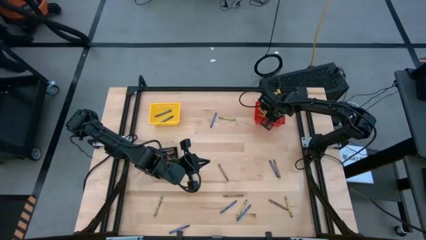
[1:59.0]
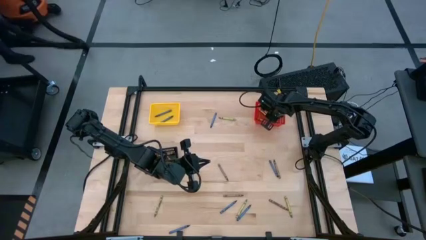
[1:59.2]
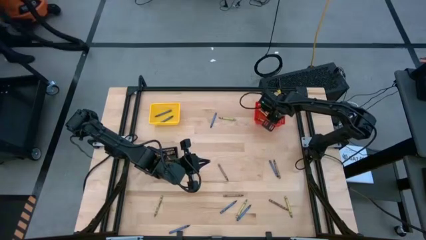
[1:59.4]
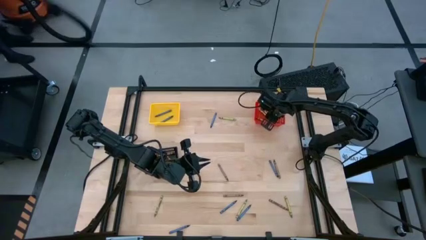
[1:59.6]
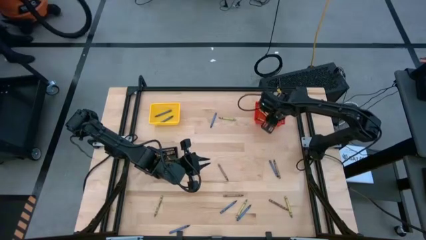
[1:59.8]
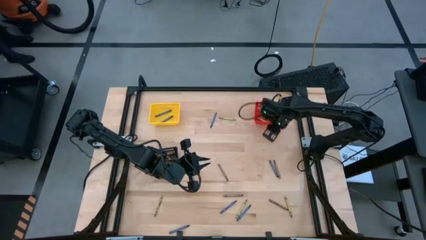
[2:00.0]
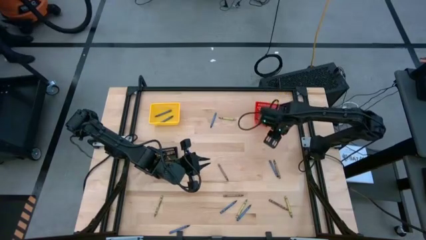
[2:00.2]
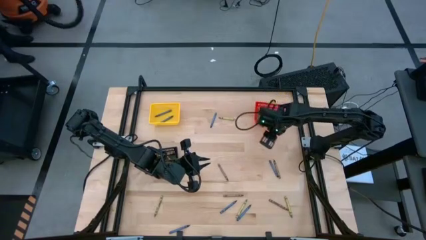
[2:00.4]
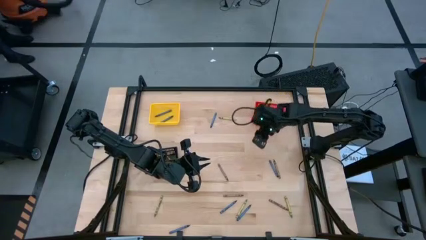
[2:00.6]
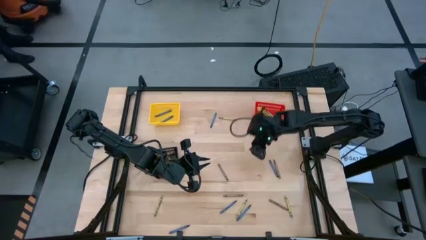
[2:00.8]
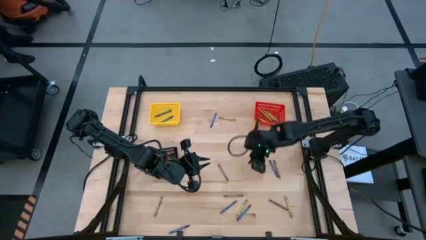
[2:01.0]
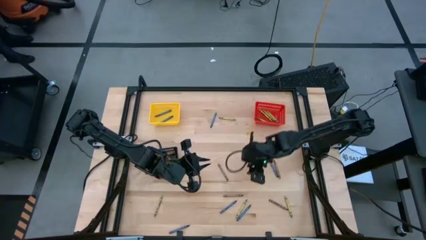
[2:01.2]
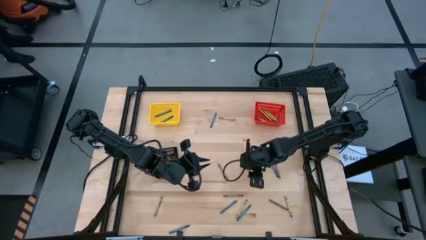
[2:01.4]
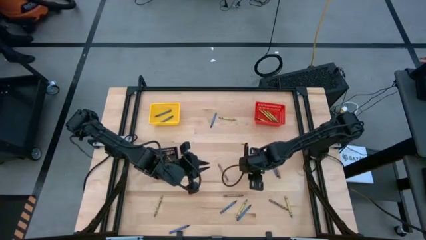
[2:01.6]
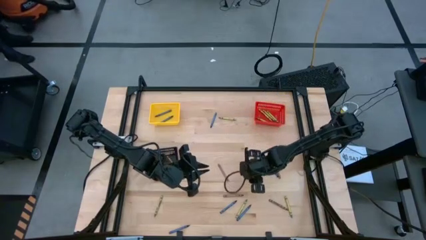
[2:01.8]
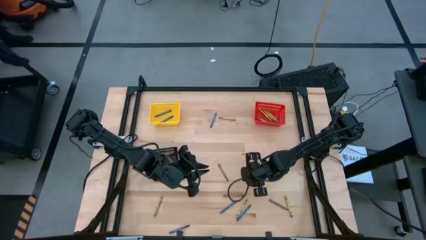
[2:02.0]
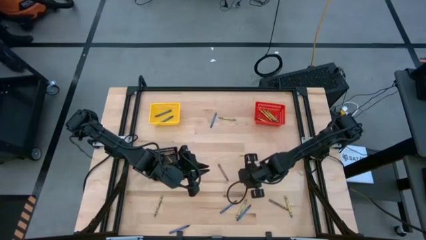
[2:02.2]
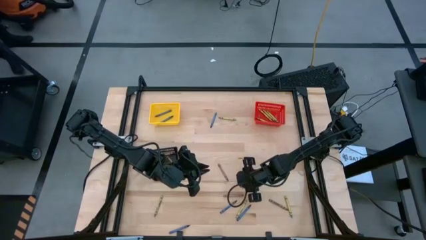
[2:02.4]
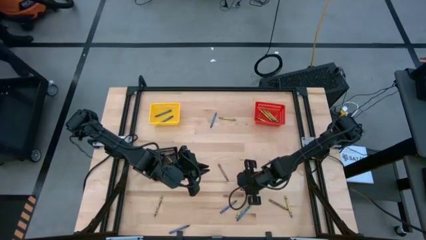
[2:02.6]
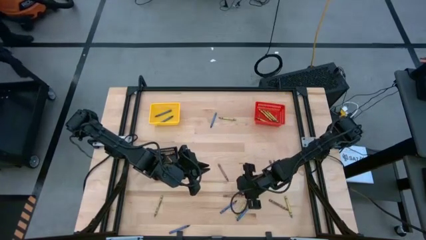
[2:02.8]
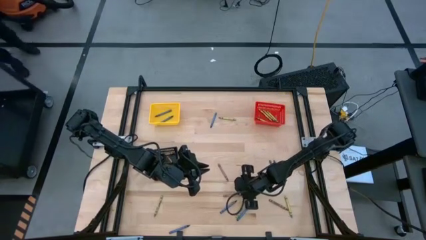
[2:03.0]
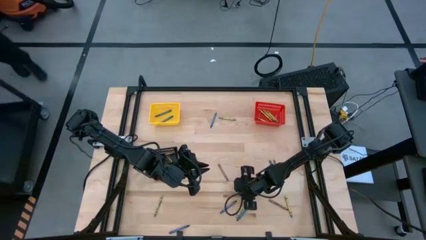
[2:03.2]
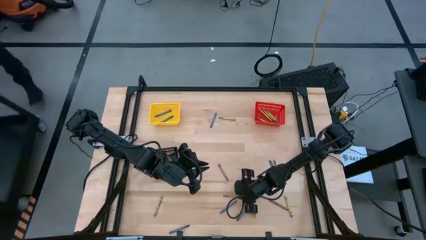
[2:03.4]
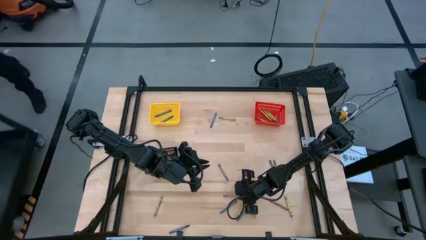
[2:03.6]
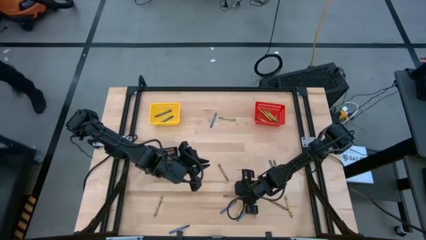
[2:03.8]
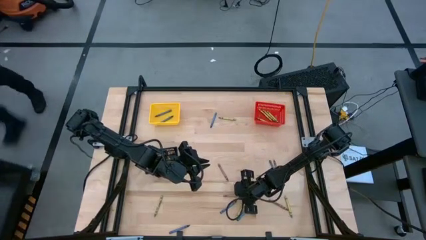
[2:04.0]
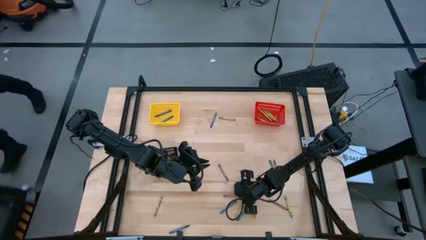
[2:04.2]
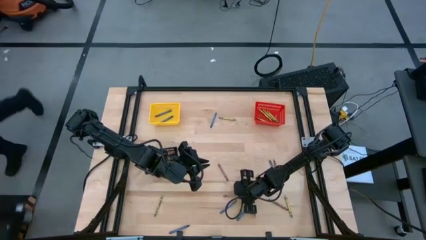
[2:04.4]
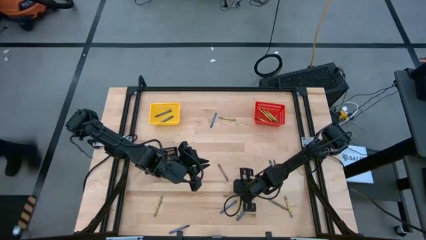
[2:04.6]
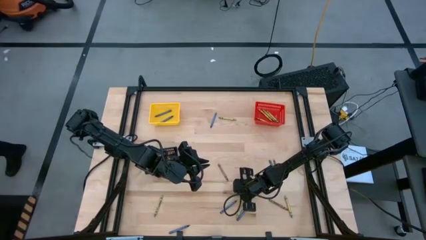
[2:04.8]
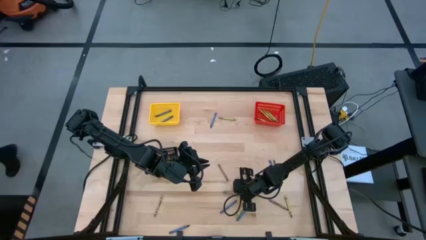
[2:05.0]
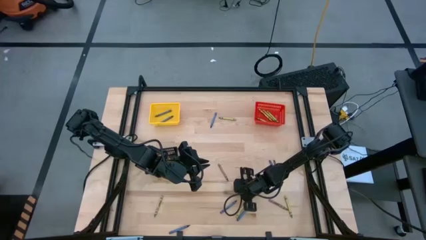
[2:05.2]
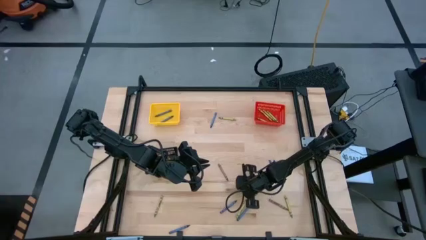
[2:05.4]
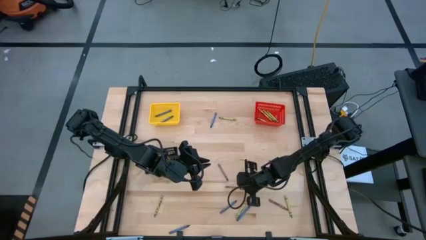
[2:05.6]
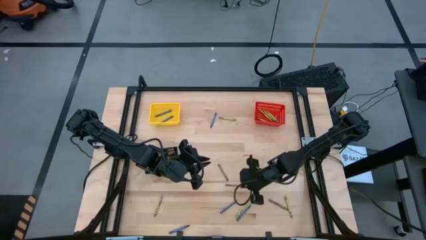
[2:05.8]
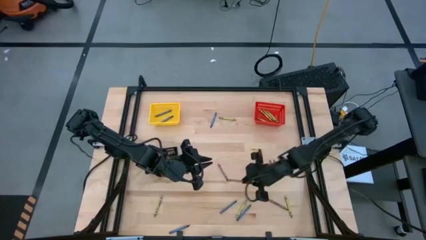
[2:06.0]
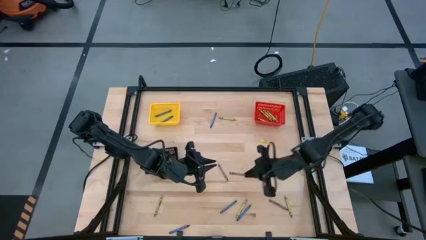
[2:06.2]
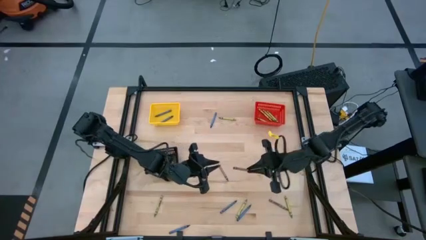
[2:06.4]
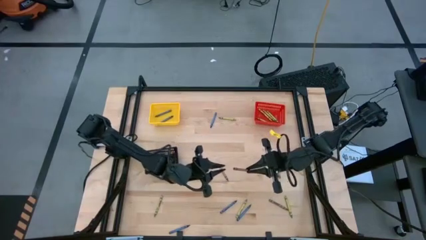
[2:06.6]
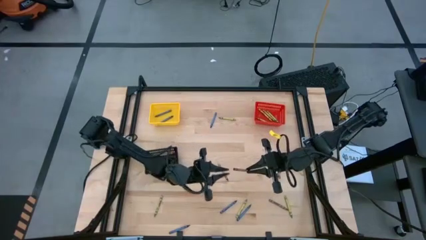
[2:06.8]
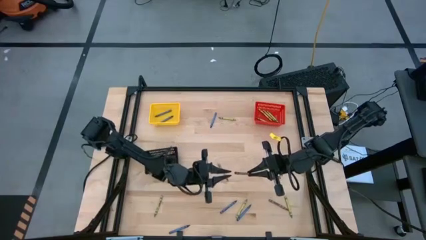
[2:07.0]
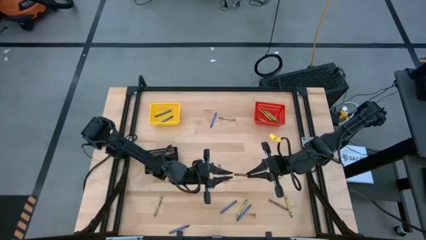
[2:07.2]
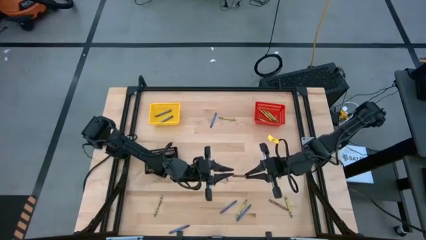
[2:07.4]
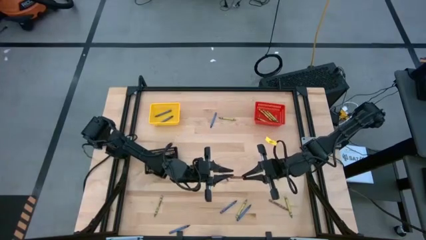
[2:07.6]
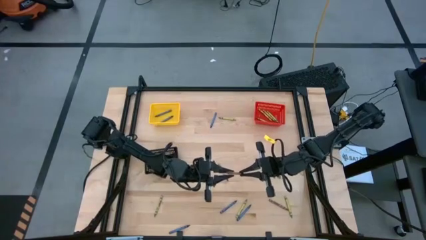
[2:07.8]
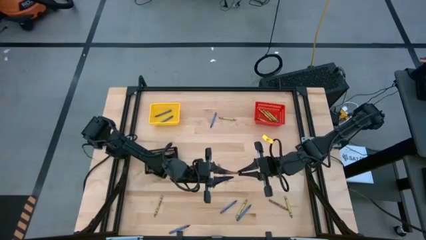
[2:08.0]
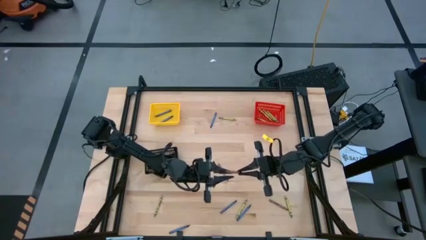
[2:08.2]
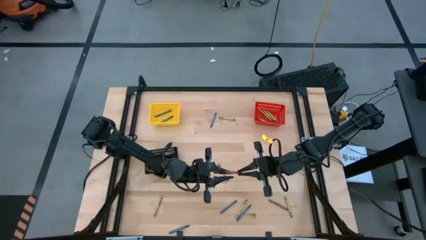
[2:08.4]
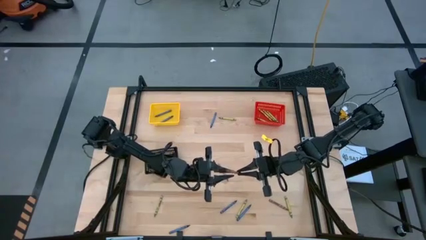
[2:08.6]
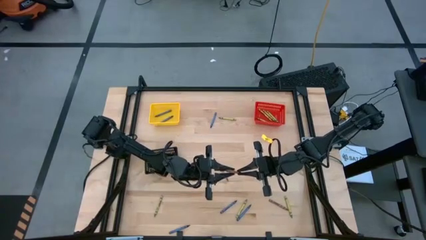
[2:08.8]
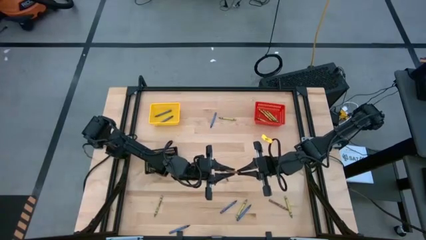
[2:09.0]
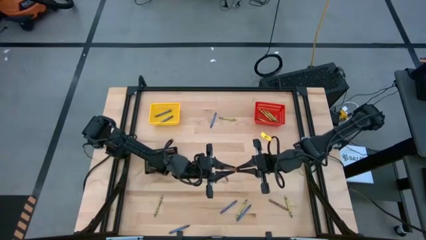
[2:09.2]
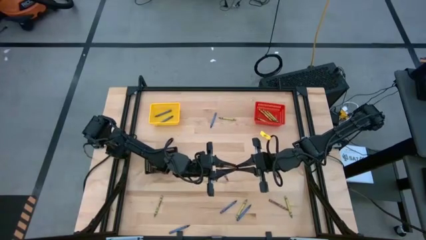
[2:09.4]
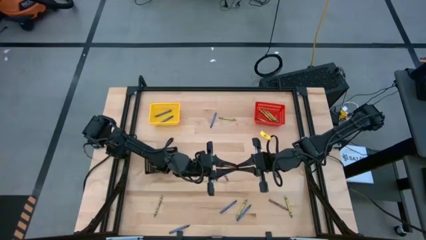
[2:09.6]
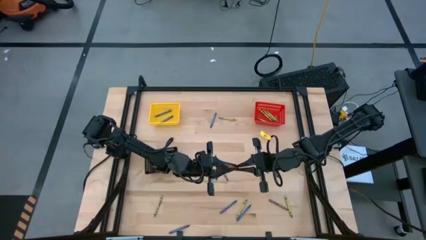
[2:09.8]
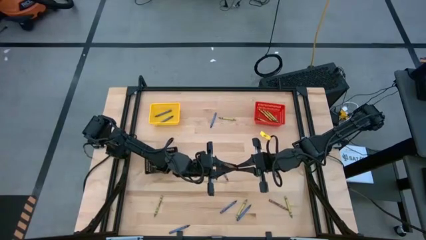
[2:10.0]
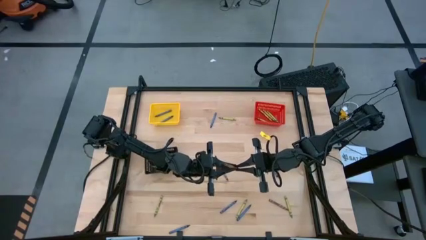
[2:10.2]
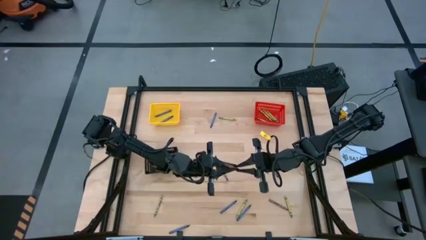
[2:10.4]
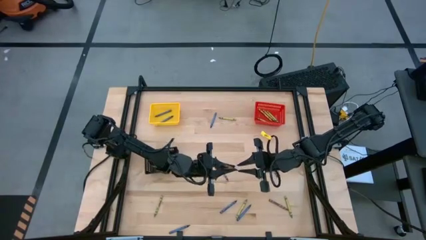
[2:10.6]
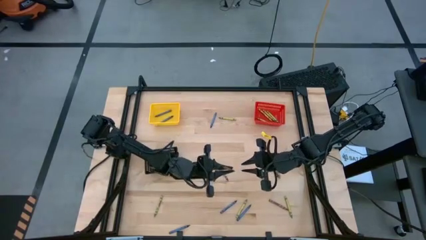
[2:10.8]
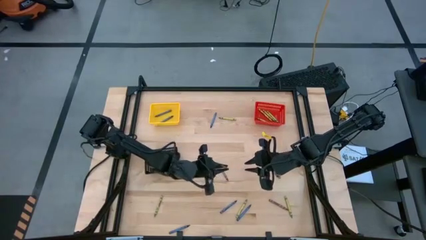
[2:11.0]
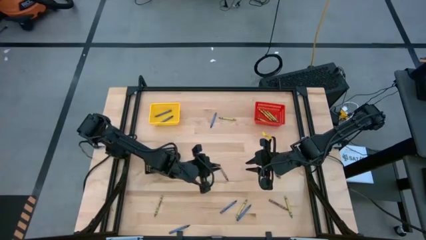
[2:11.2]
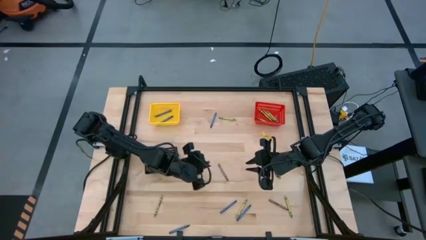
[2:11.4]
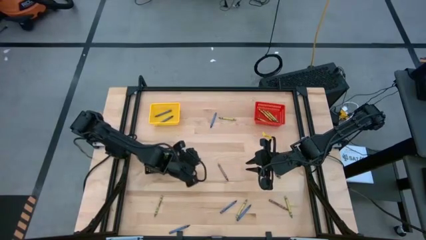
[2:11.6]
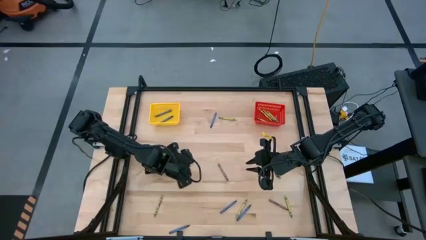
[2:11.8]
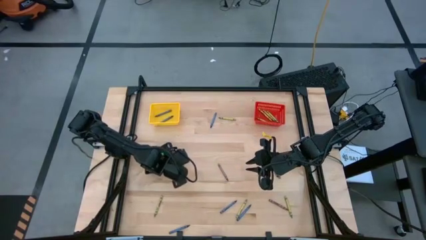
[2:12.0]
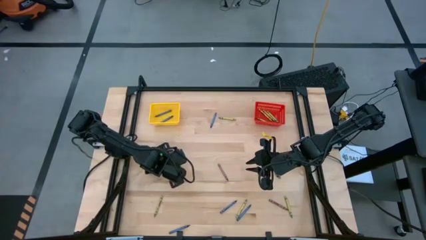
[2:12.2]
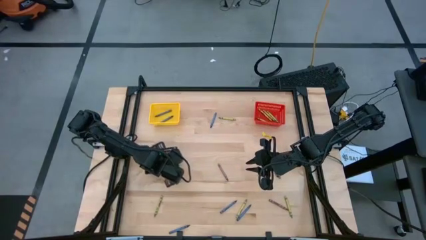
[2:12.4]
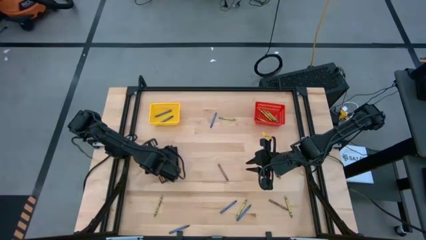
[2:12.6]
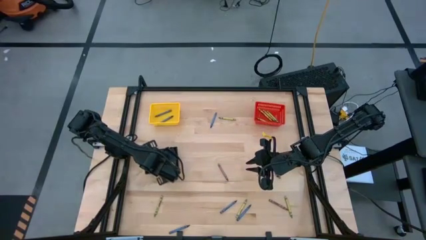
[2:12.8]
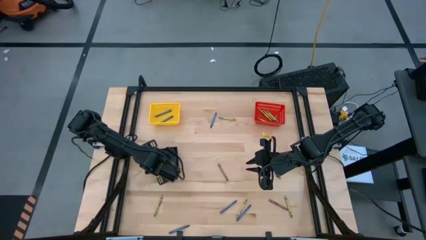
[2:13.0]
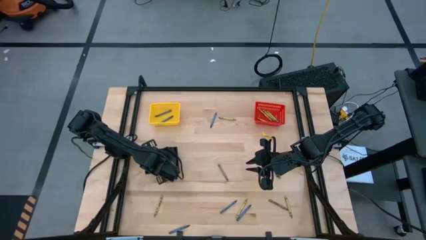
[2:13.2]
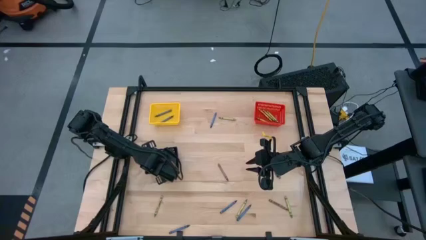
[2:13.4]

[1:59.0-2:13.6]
Task: Sort crayons
Put the brown crayon into the black bin
